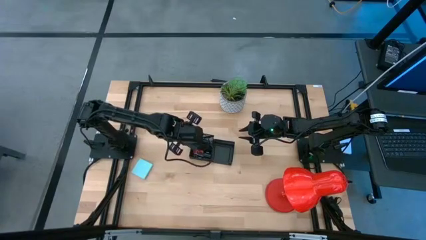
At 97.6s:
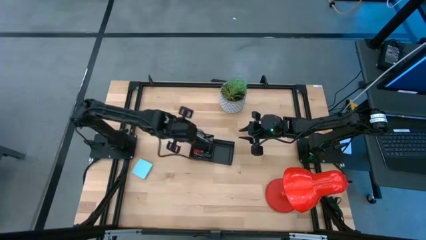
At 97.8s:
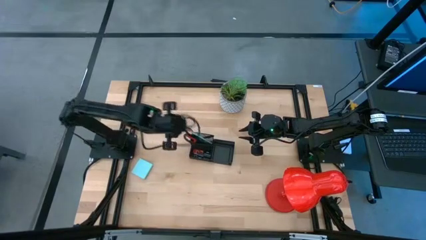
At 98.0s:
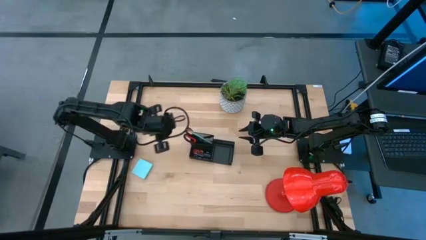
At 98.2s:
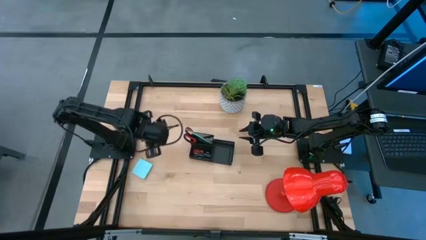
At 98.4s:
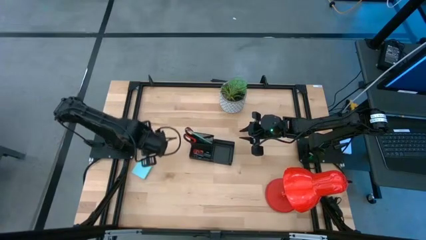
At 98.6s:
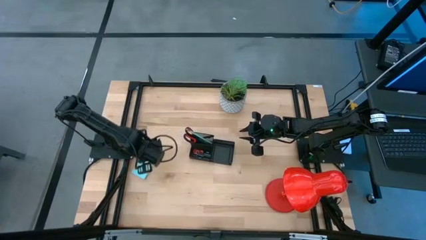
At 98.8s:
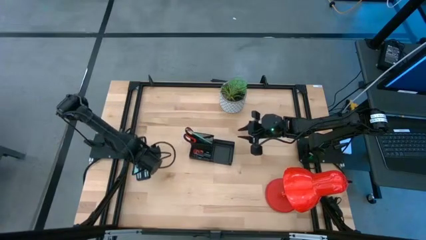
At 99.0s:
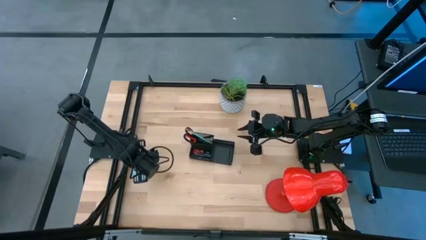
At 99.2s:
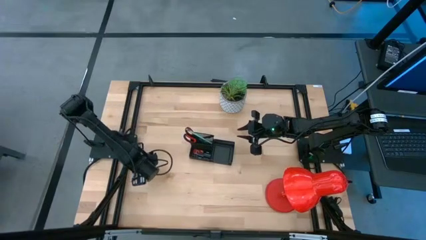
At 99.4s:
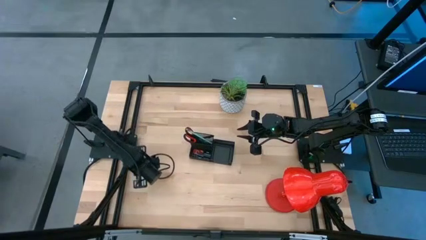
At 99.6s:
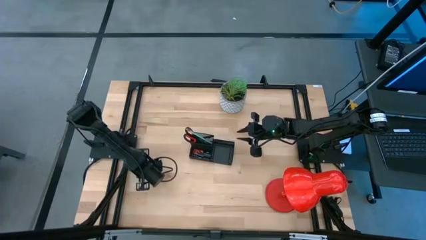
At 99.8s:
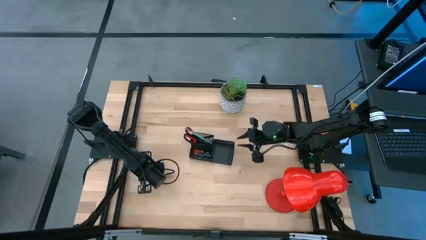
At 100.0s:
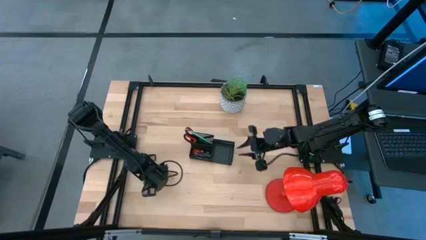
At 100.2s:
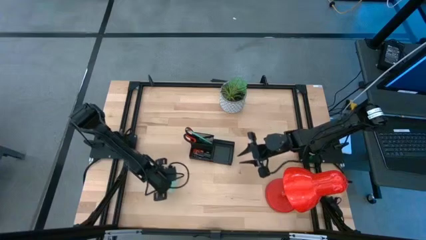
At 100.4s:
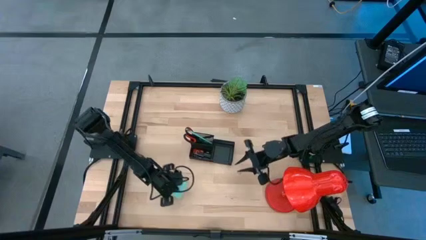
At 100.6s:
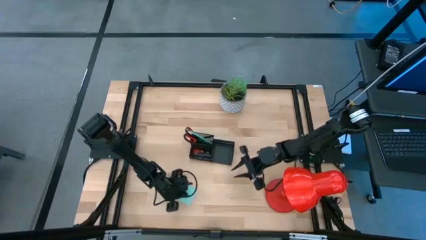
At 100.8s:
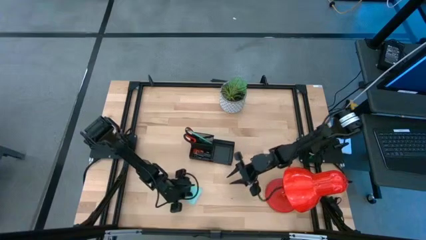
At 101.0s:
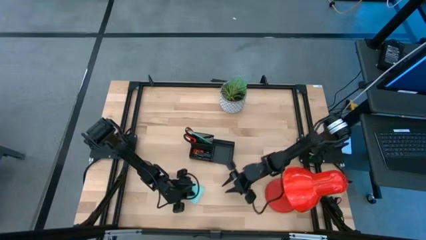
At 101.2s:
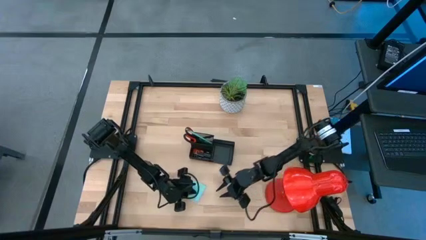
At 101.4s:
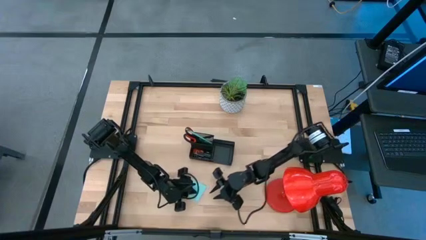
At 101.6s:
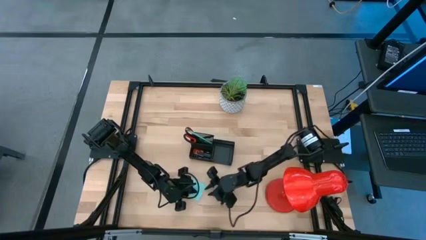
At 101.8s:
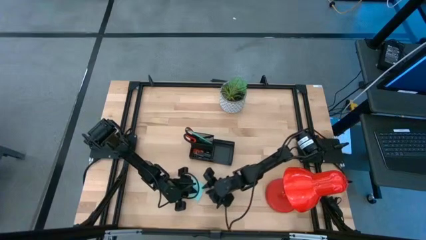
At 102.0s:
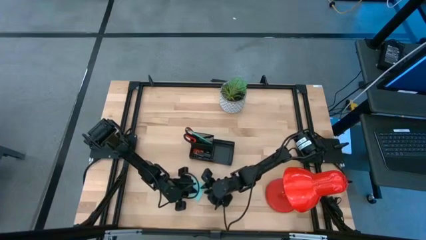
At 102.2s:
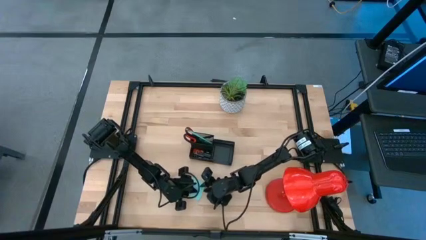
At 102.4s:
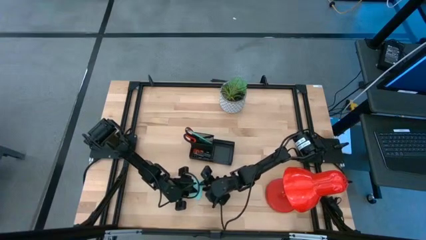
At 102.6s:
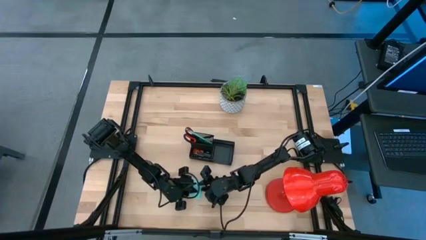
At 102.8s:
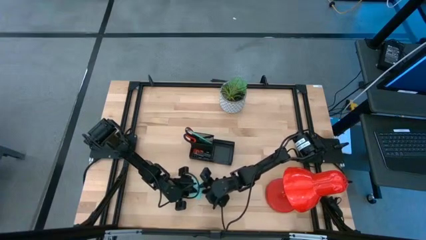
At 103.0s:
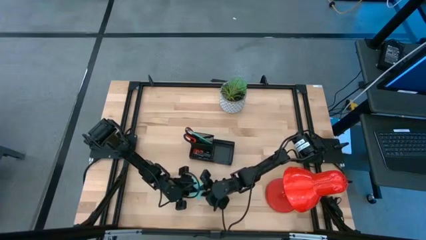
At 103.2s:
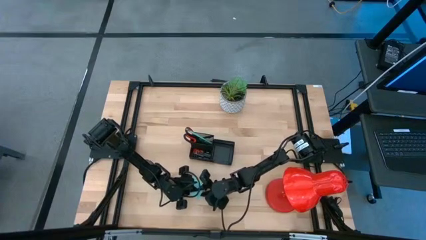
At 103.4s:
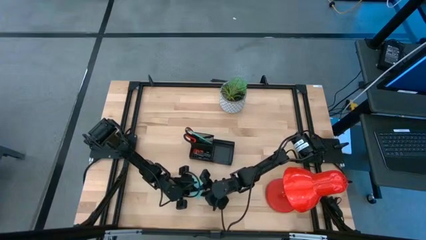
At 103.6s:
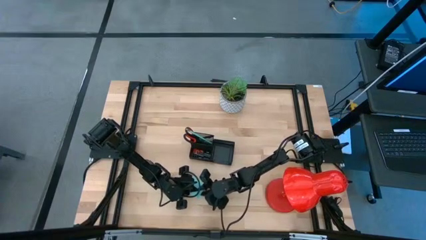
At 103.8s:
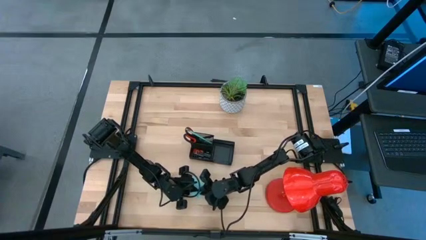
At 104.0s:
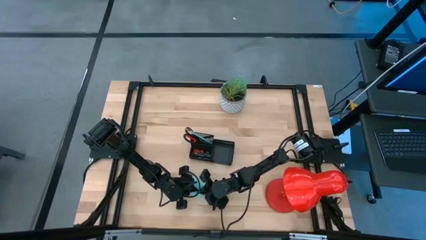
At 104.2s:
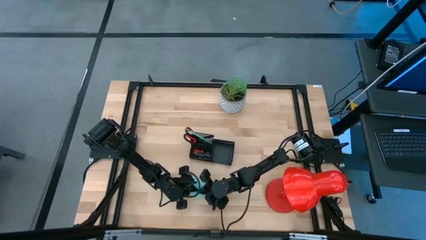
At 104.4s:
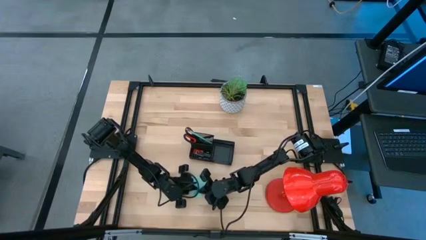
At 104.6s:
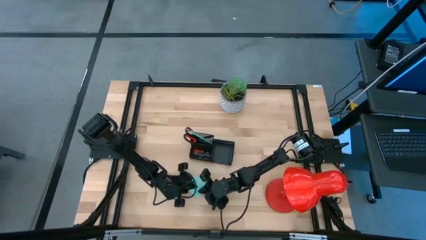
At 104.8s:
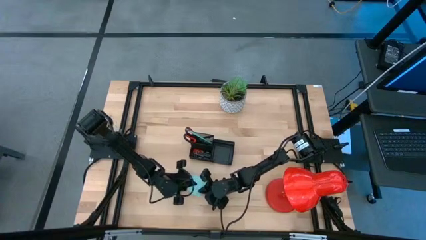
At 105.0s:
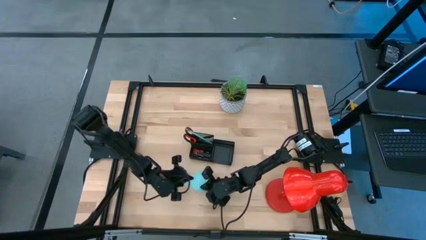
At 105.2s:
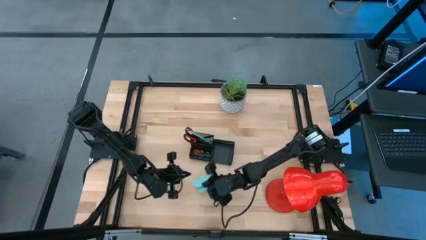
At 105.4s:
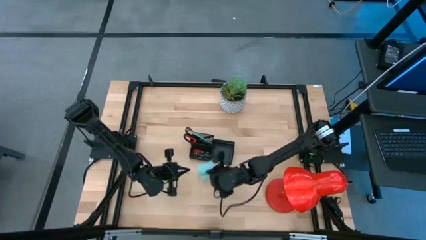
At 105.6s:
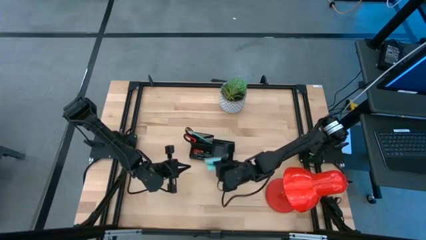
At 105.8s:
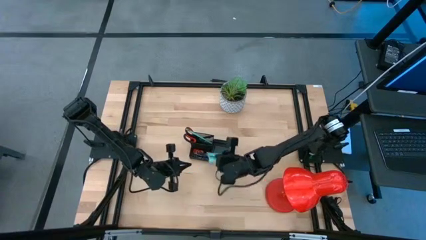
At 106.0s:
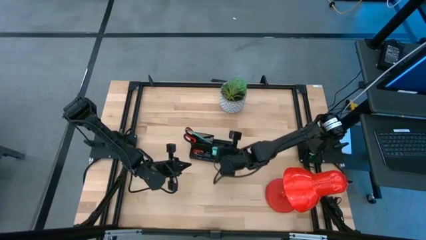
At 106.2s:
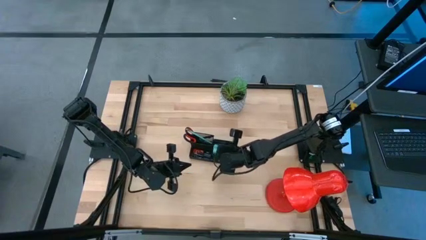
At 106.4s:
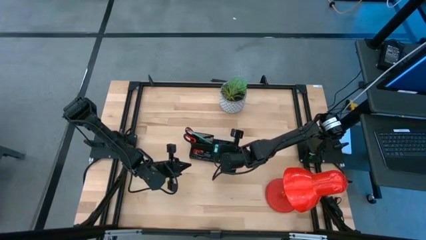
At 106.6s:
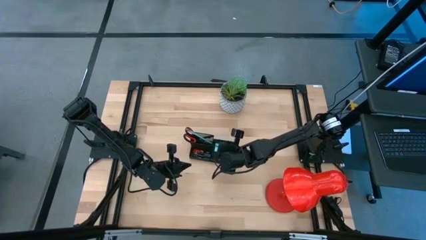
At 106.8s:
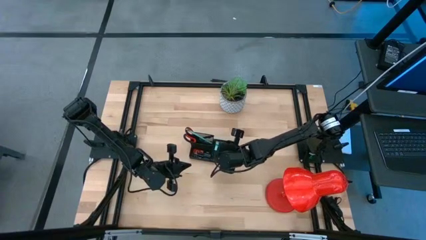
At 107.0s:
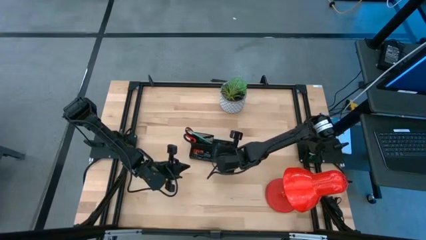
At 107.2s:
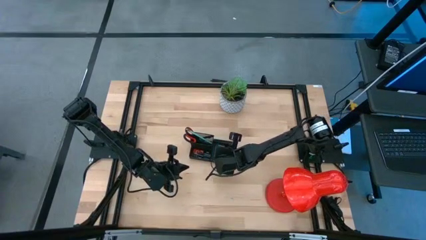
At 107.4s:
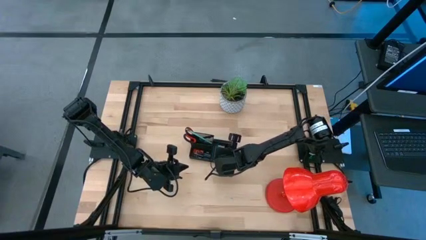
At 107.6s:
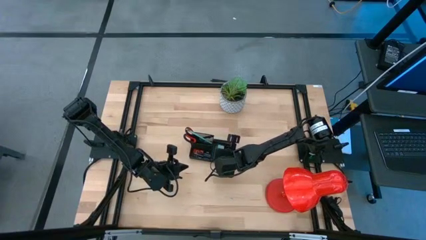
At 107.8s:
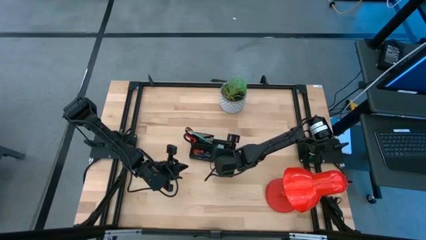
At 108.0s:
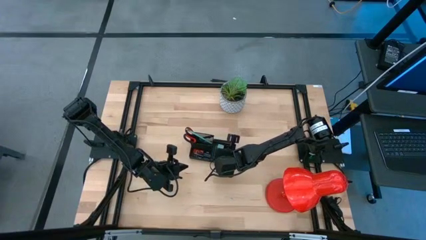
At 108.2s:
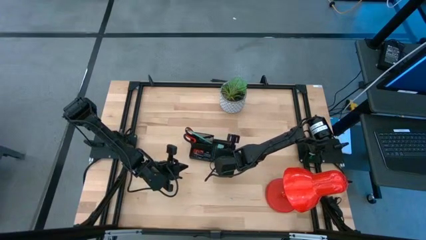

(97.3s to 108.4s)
Task: Pick and place office supplies into organizer
Put the sticky notes into the right section of the desk organizer

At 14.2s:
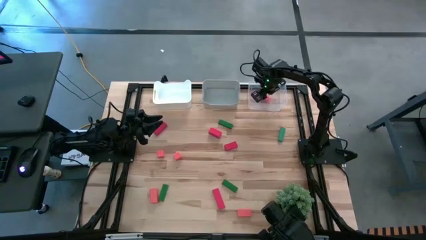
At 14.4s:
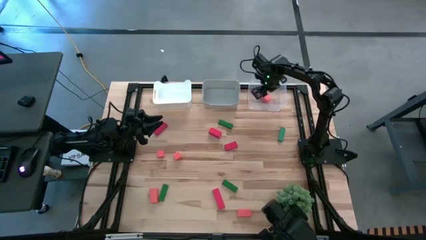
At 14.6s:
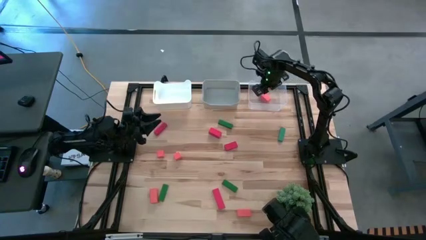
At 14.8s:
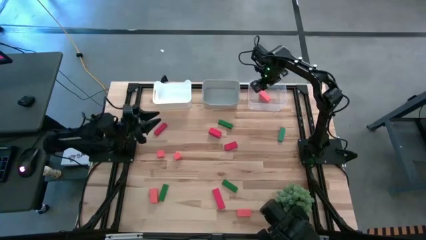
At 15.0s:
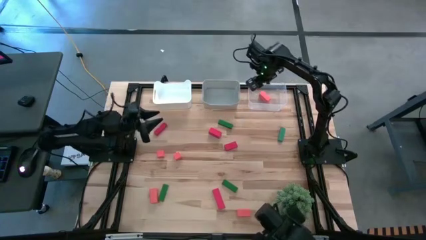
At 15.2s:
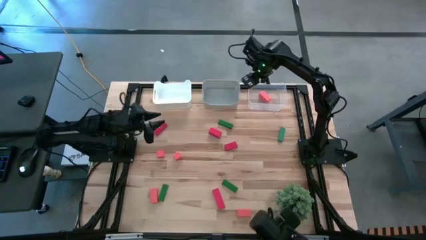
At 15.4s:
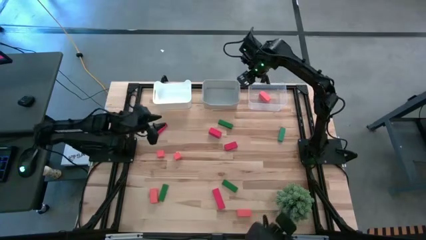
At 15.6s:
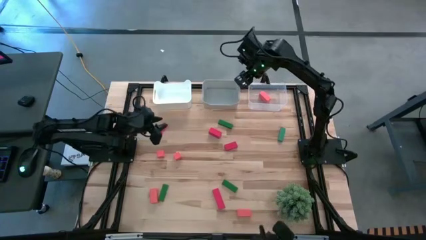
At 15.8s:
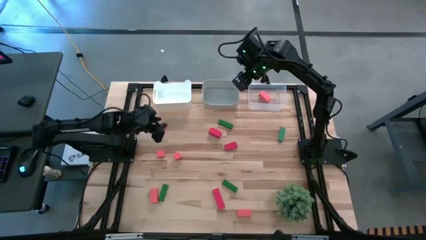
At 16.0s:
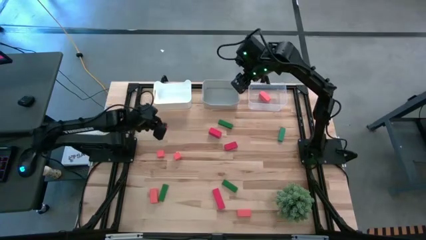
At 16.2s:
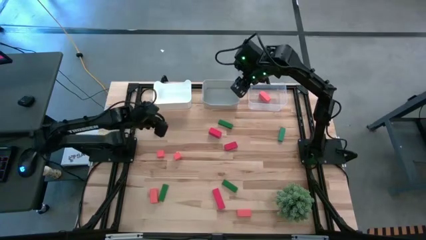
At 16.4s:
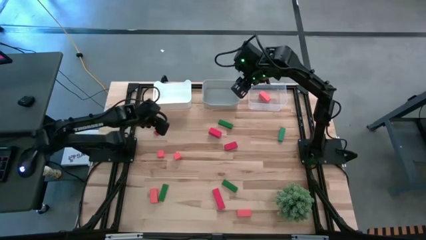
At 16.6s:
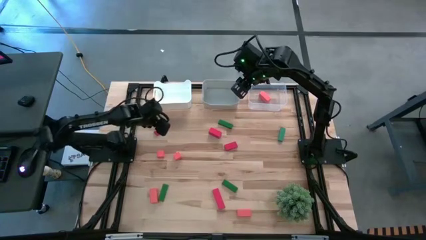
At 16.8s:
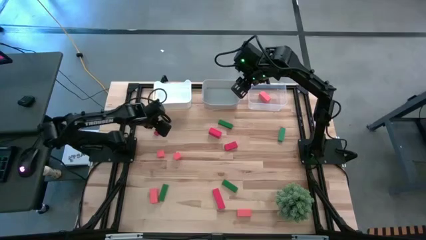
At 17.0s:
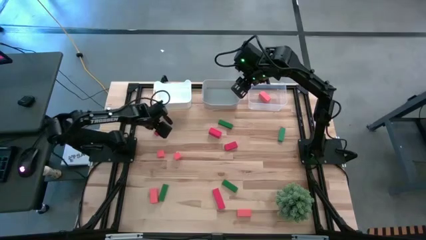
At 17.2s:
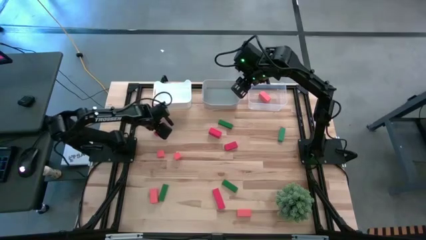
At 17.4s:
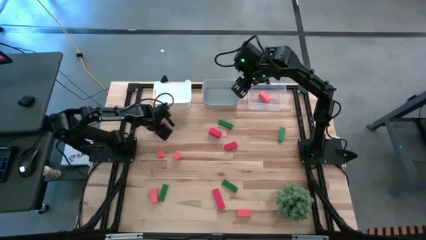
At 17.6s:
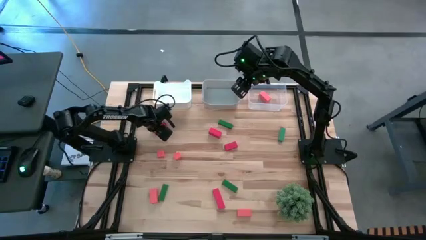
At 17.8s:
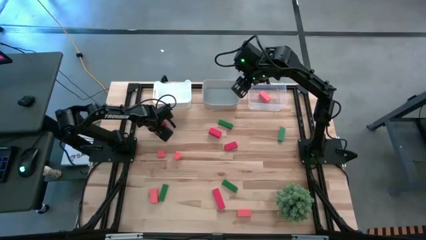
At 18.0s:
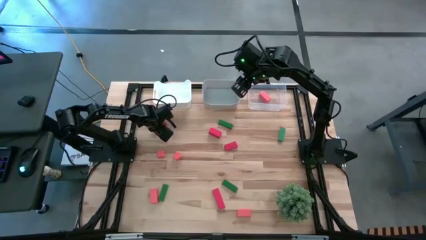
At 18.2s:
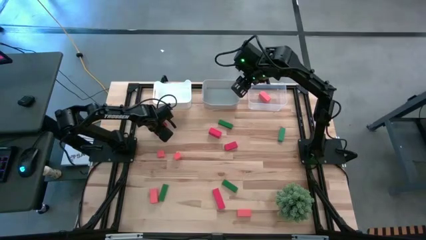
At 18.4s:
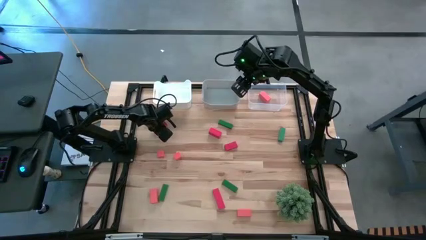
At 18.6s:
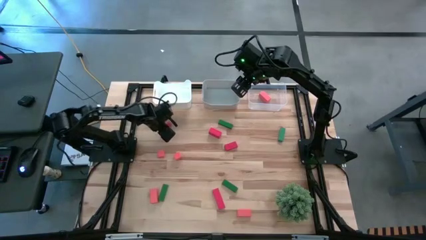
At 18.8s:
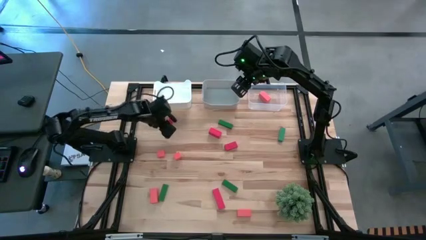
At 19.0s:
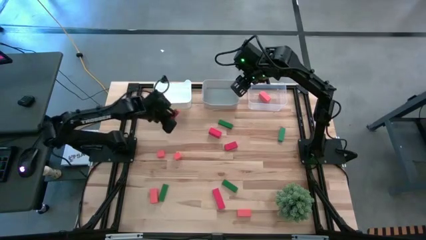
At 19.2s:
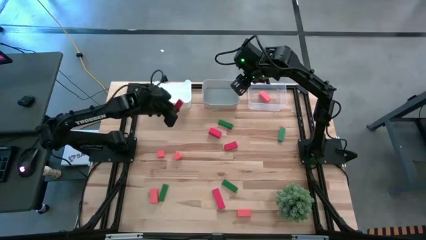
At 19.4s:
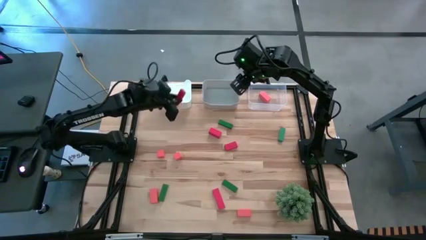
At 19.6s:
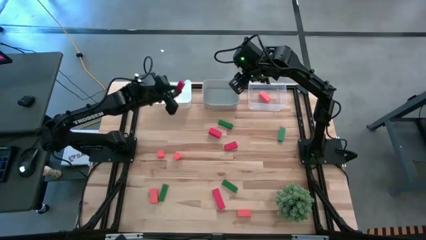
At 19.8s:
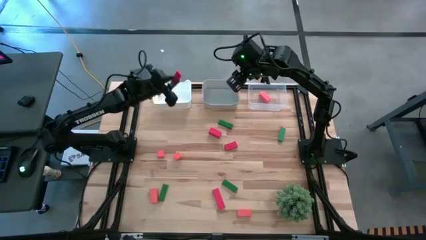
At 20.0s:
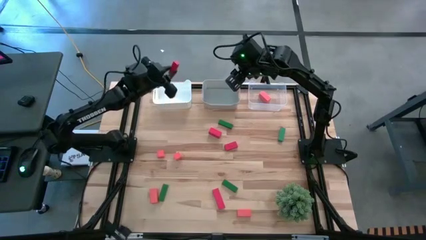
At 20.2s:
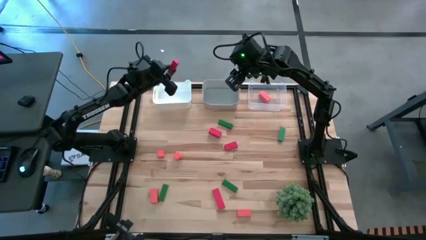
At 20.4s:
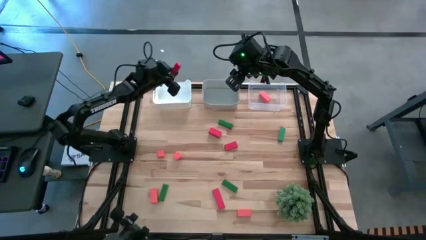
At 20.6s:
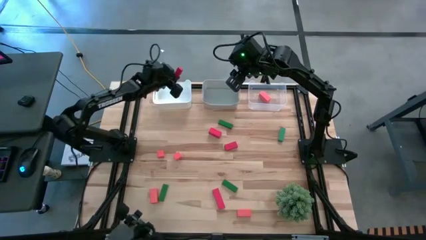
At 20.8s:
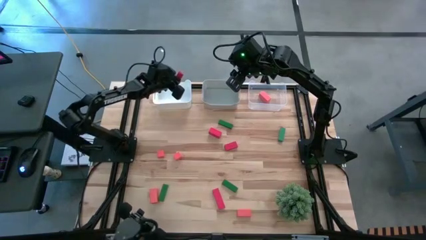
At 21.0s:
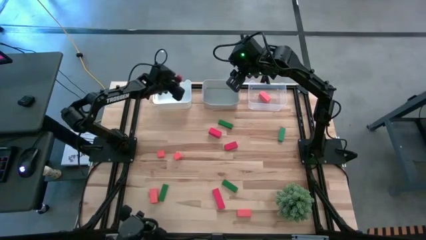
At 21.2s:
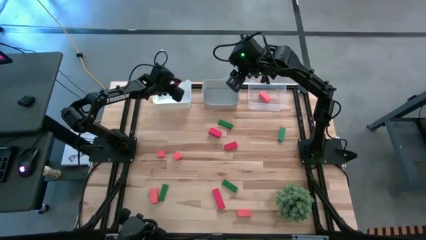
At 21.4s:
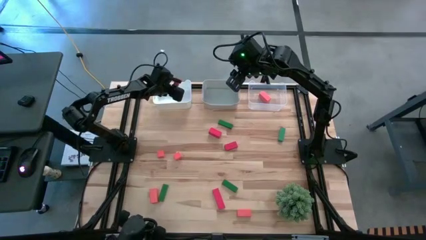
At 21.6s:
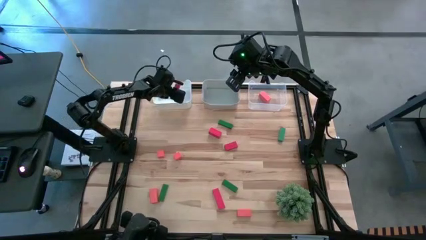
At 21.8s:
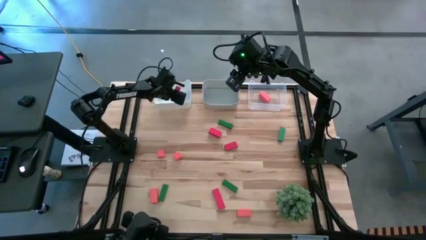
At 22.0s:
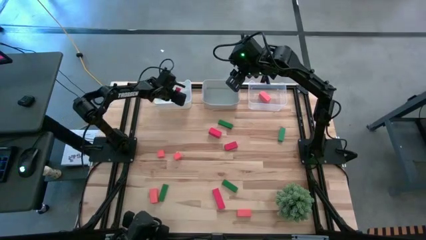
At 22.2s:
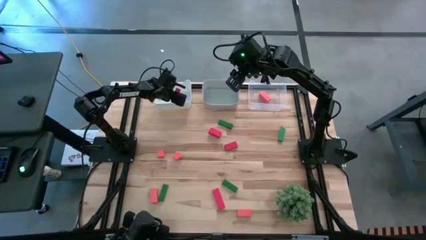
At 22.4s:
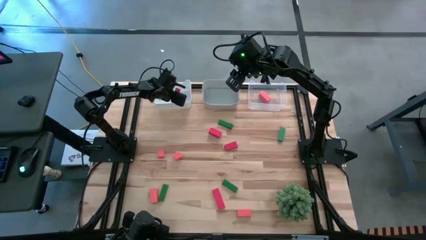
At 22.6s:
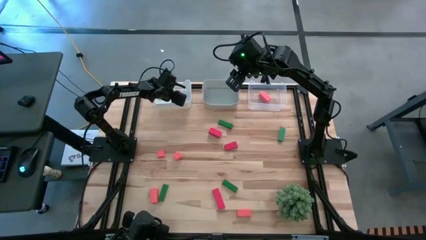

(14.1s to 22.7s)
Task: Sort & place blocks by color
Put the top left red block into the white bin
